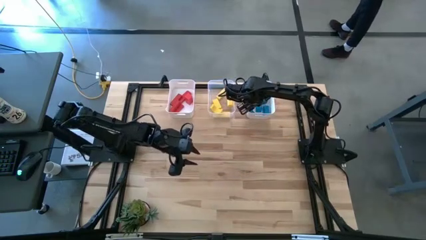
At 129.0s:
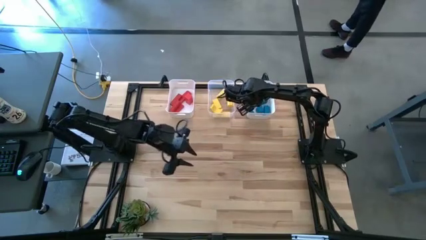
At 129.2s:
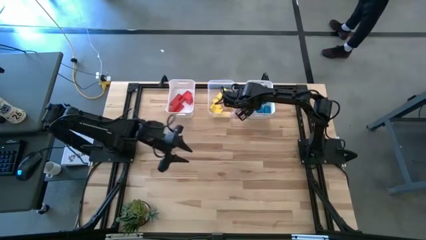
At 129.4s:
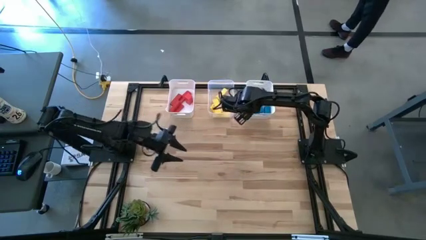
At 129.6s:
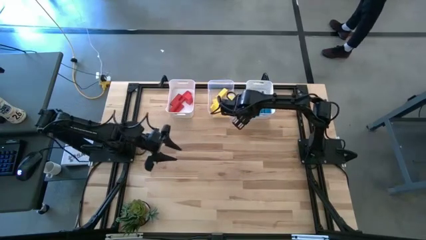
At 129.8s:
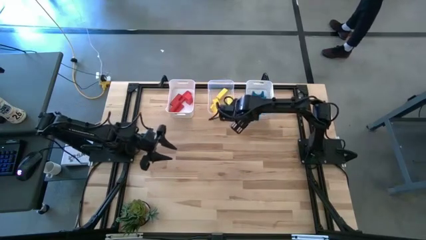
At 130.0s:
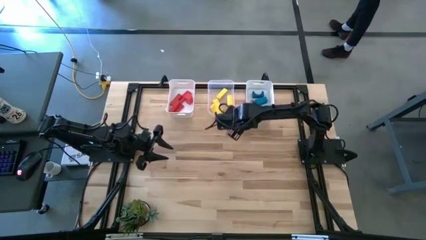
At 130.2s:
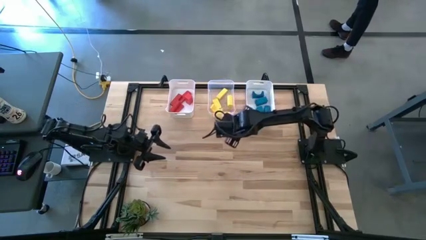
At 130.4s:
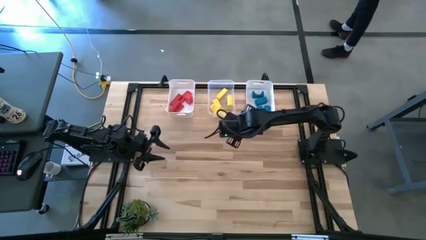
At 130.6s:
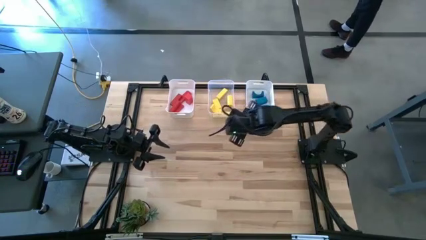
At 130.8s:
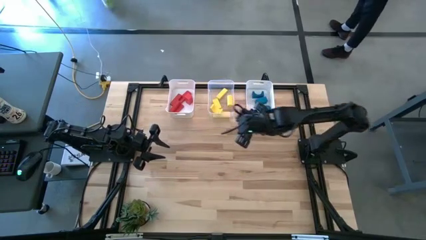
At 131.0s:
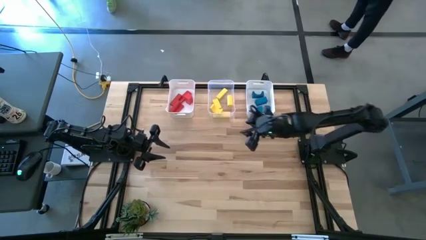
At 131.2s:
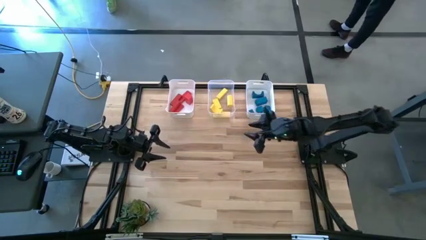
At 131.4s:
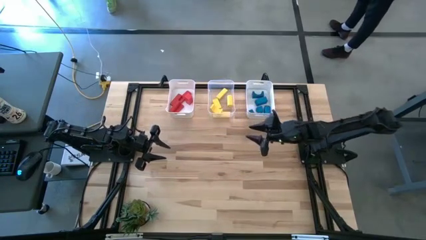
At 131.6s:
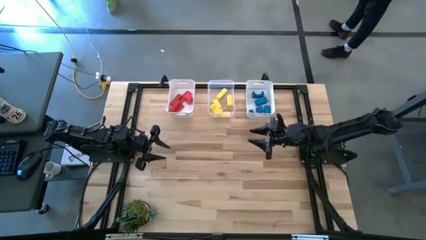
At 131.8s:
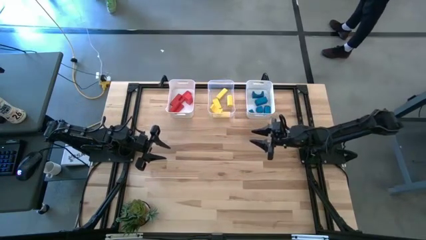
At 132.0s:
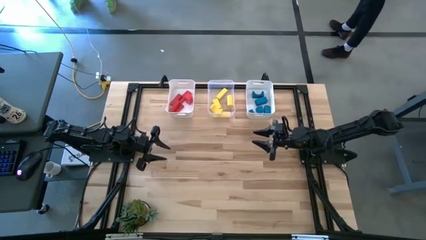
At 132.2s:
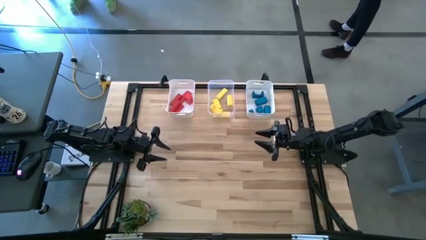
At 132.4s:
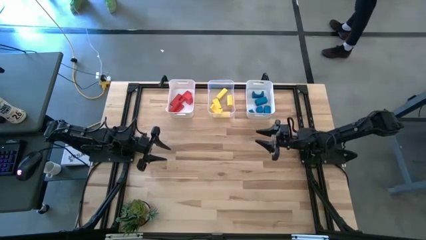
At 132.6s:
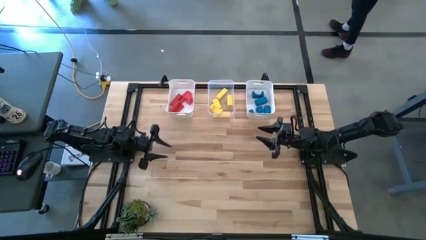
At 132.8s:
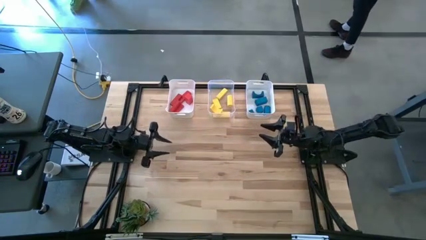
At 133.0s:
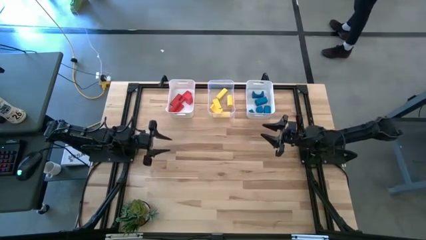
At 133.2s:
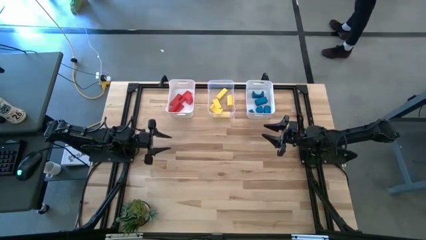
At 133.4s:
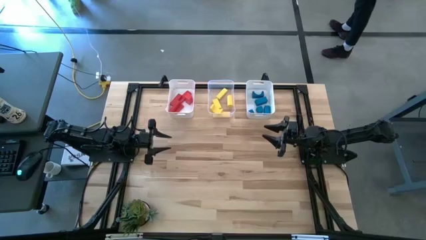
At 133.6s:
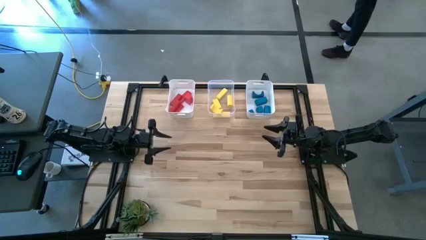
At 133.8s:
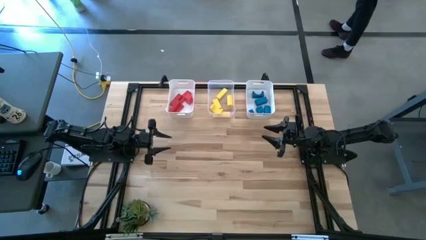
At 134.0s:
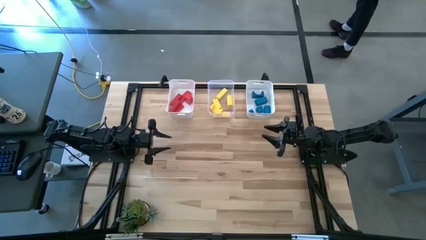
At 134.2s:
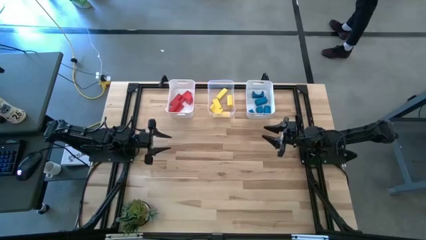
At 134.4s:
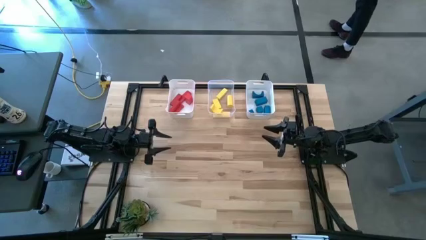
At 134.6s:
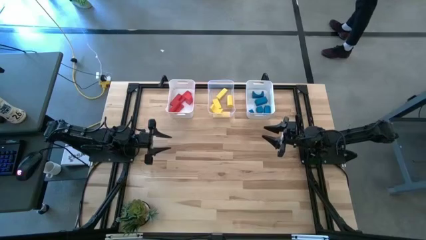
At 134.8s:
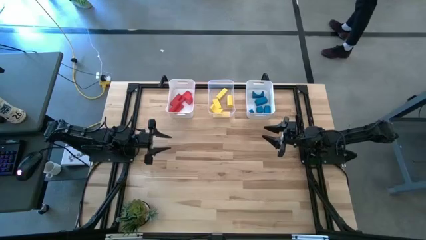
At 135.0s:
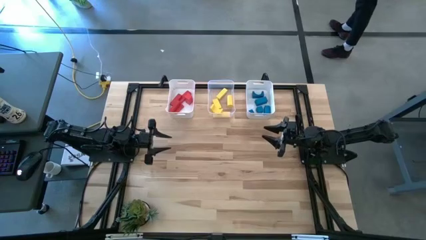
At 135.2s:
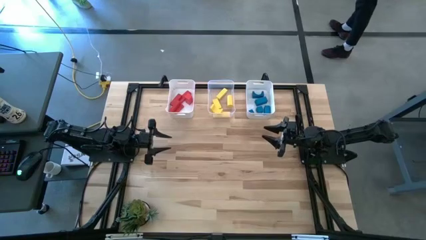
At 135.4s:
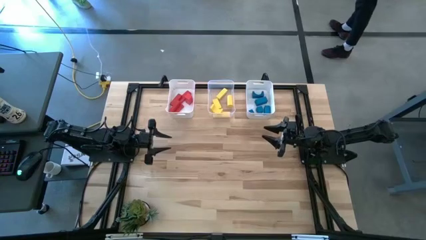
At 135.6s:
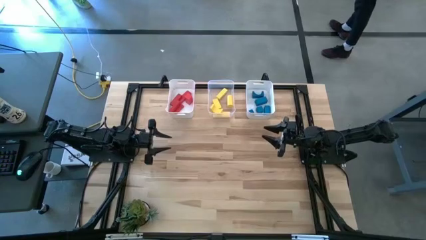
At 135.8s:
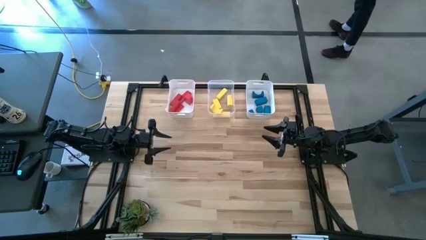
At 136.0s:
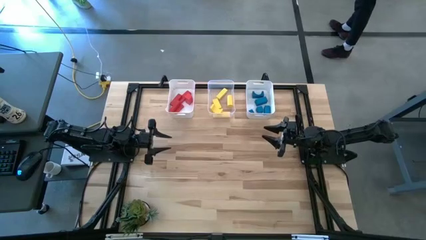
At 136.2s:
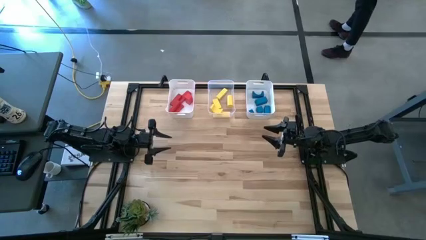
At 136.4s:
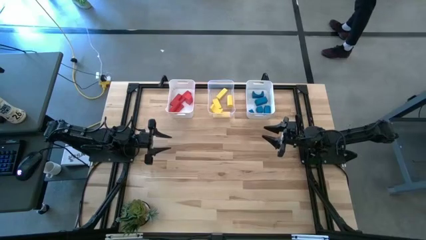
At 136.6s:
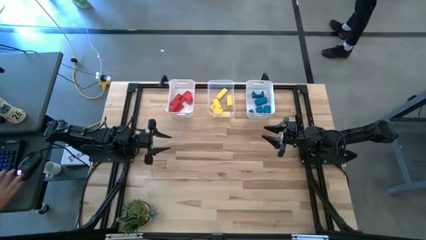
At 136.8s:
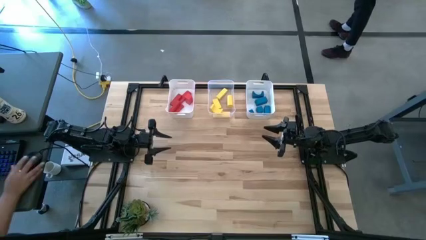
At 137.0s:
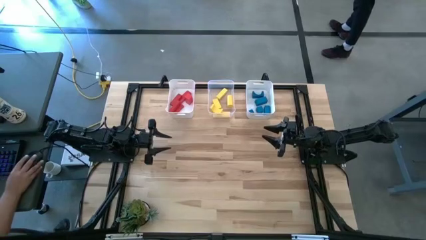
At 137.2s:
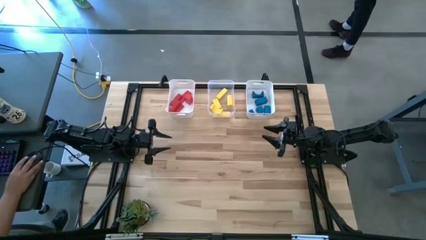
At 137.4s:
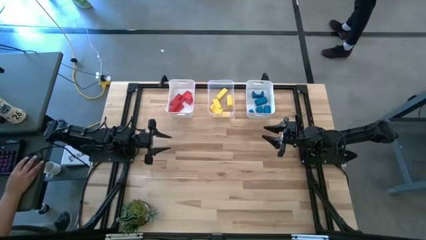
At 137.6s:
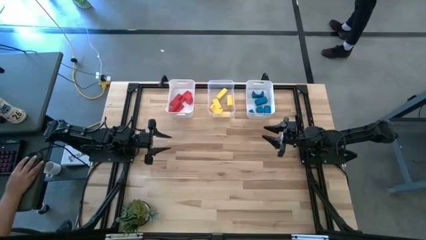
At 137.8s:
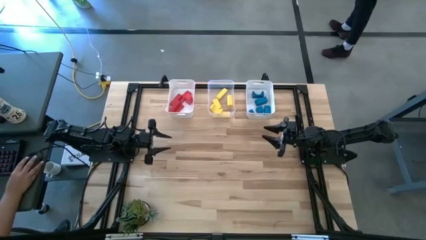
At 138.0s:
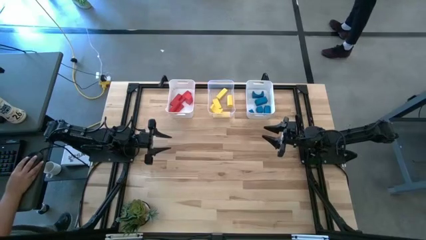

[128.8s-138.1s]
Task: Sort & place blocks by color
Return to Home Position

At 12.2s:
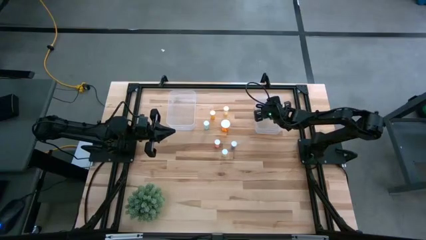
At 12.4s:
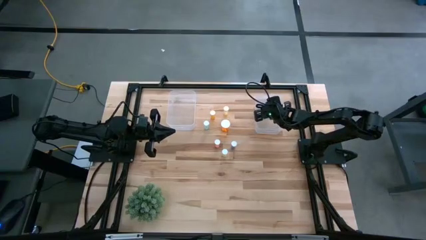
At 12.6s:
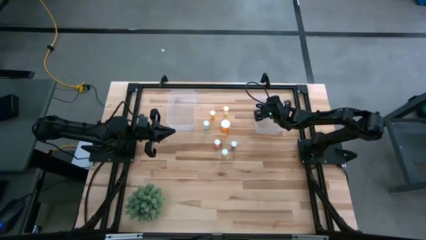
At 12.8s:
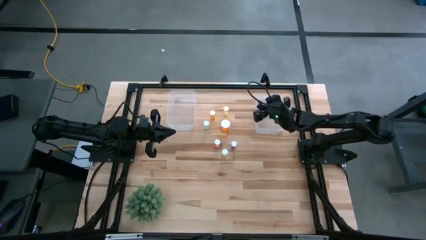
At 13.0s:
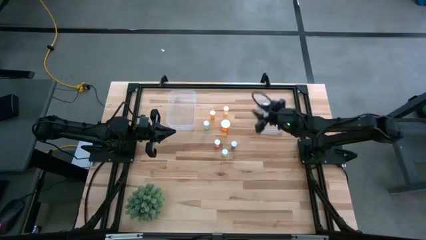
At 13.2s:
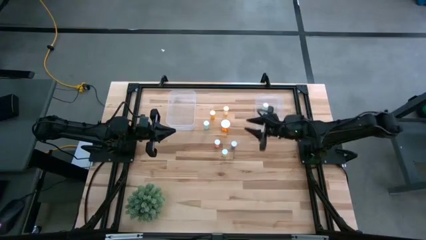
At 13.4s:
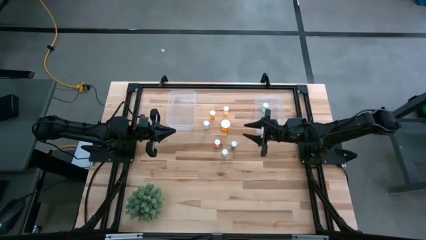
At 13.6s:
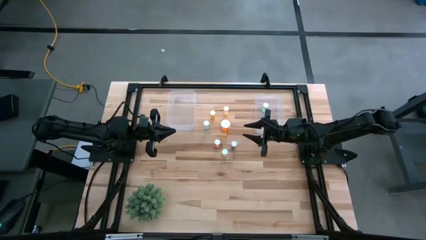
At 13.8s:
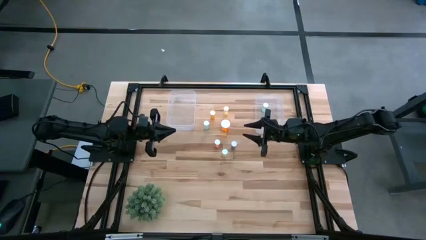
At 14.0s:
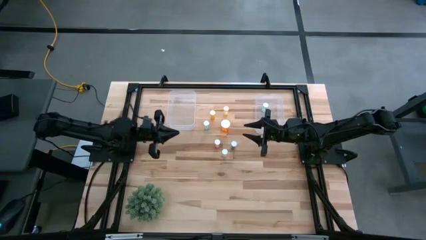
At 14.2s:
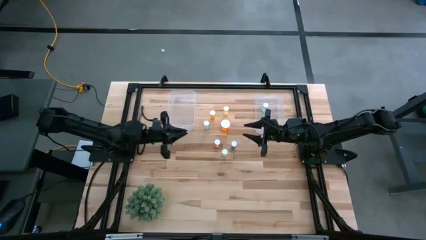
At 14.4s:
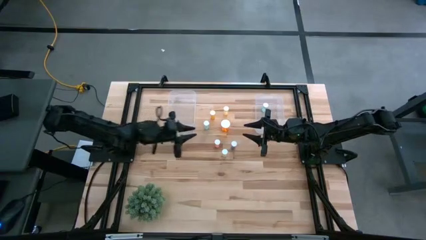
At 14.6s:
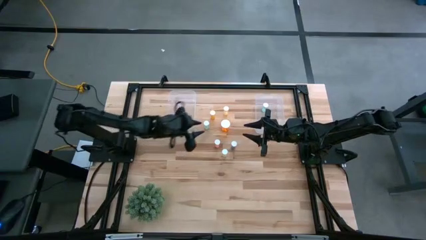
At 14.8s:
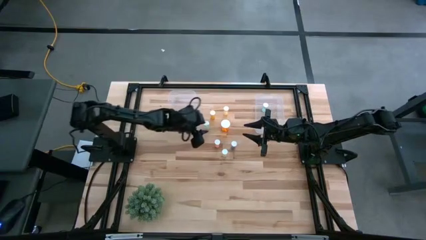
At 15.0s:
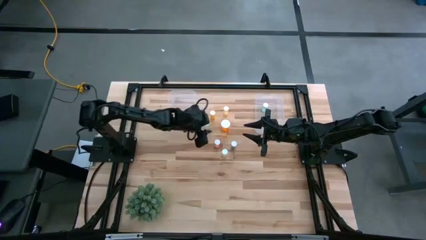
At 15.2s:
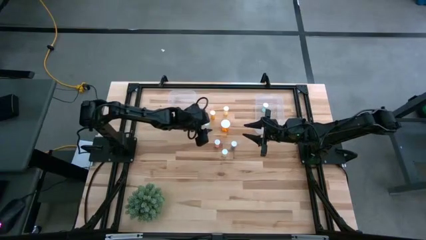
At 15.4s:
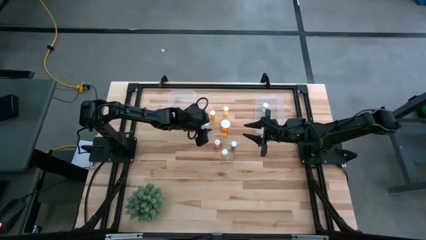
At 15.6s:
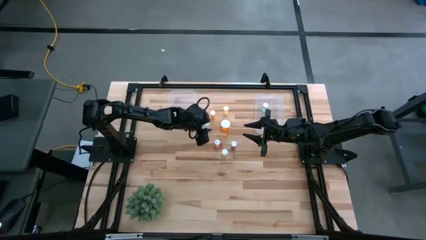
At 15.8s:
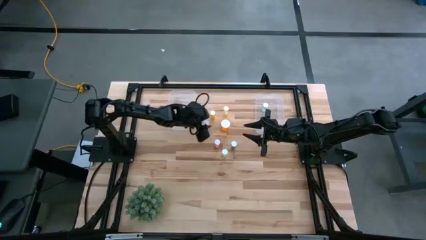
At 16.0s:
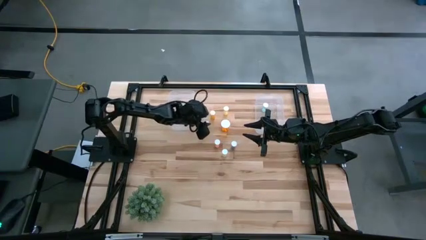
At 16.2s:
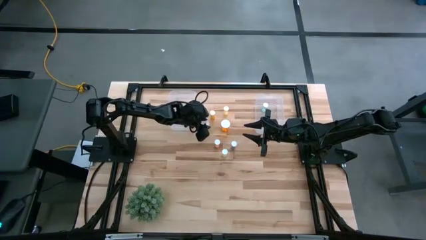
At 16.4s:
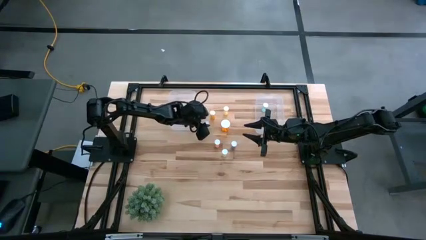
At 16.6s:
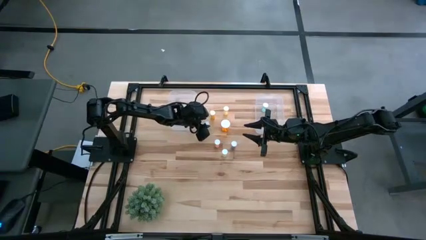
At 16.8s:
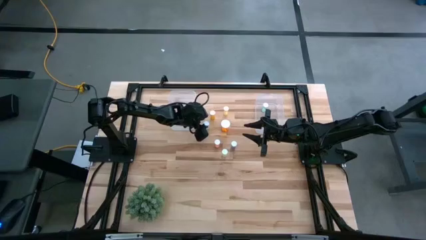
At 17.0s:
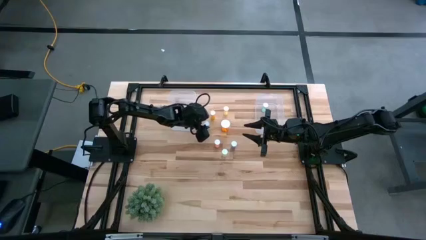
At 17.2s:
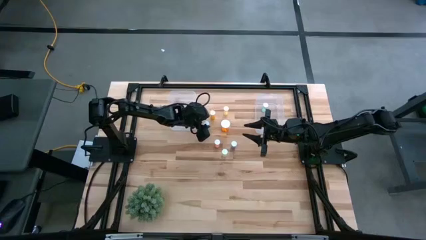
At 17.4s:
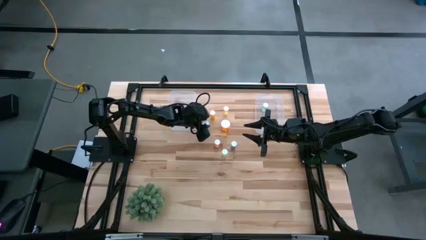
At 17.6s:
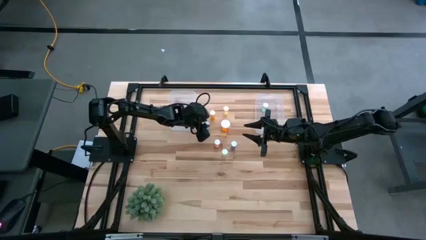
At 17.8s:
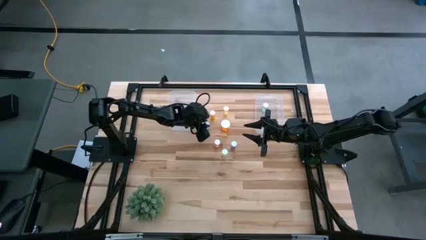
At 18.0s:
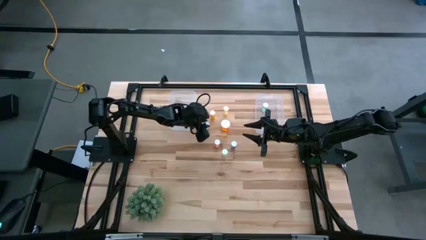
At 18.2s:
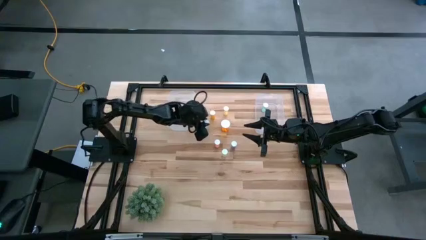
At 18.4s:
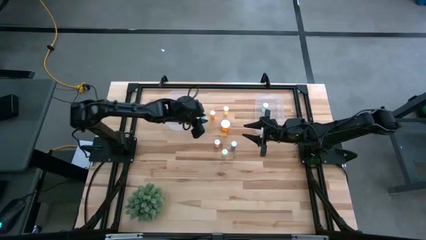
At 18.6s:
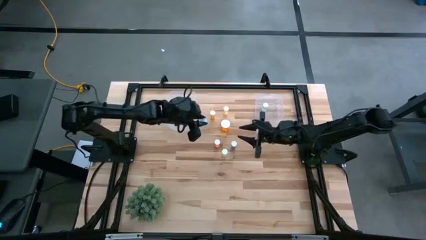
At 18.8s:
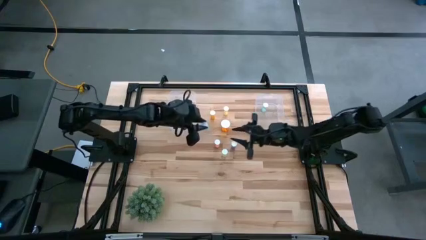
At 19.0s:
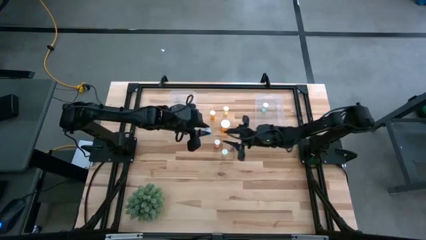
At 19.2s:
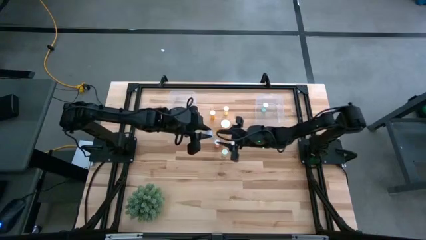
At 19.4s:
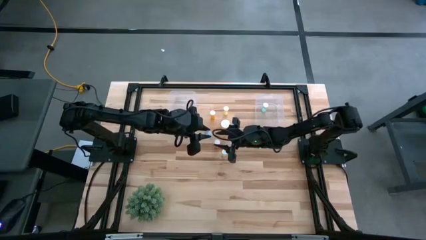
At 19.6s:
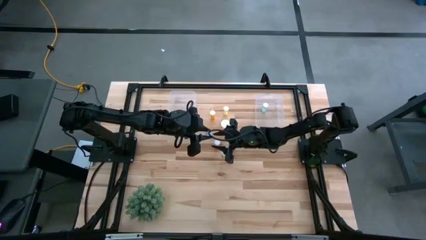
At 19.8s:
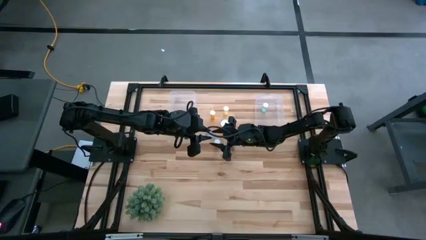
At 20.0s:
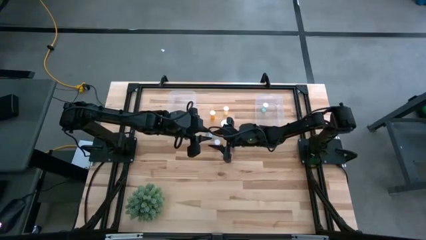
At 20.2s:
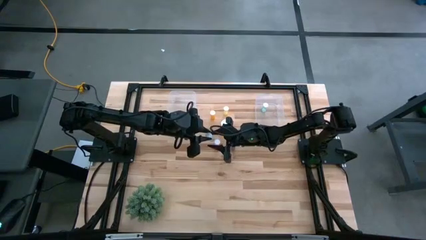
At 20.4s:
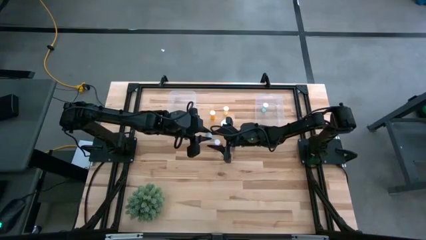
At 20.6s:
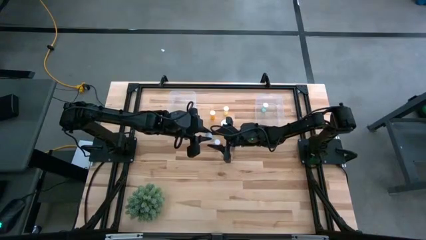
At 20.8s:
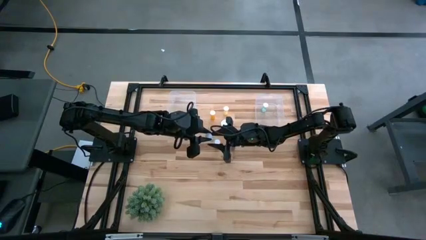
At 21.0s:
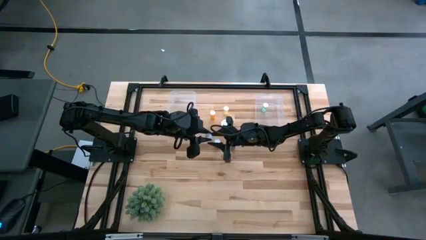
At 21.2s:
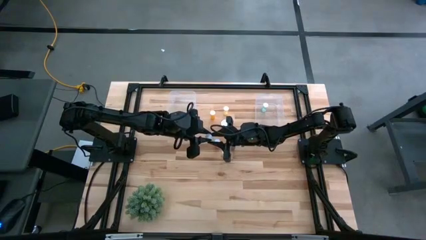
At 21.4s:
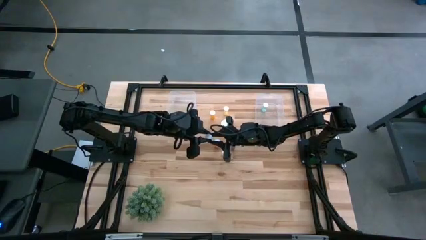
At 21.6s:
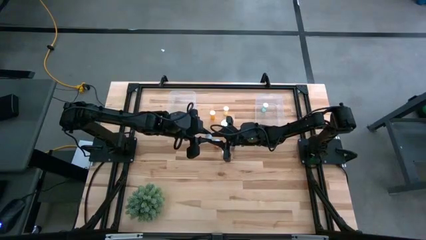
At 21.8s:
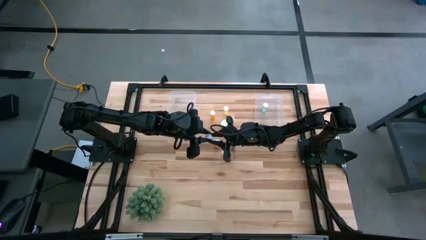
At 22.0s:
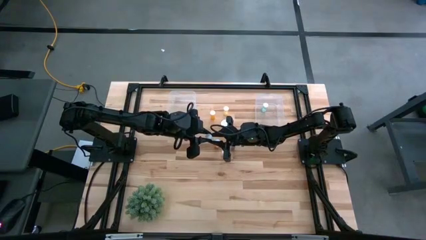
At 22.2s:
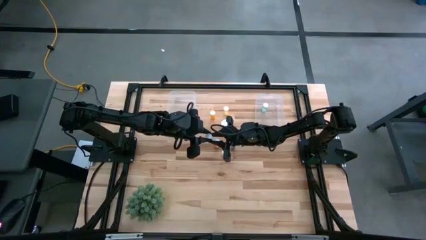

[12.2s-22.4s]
Task: Pick and place medicine bottles into bin by pill shape (circle, oval)
Put the green tablet bottle into the right transparent bin
